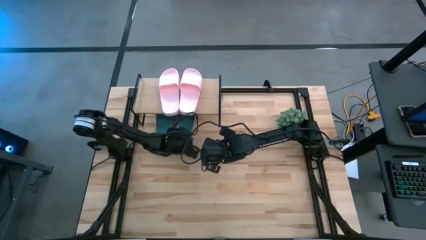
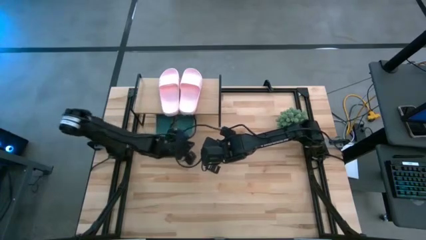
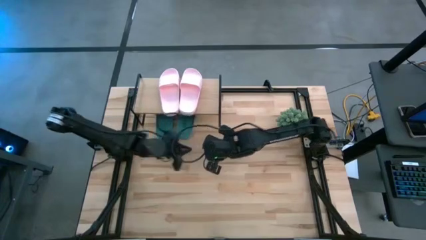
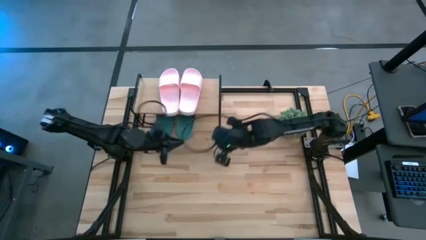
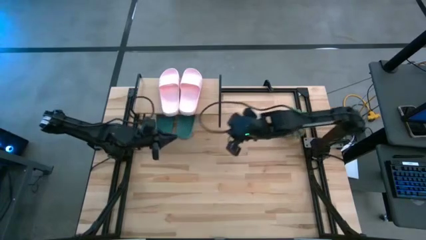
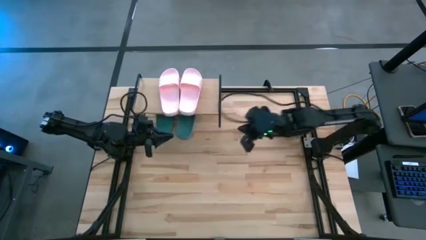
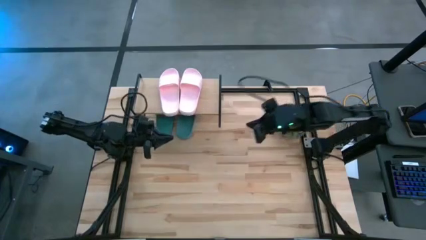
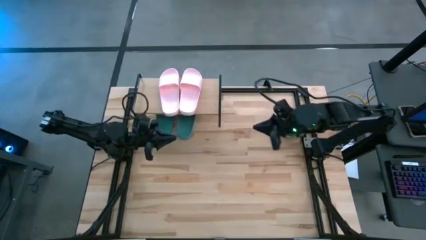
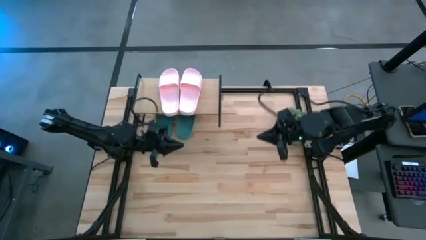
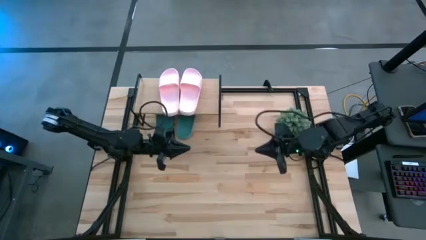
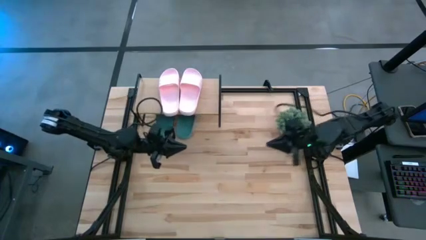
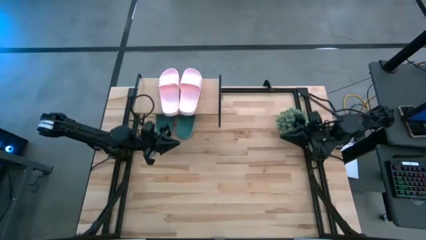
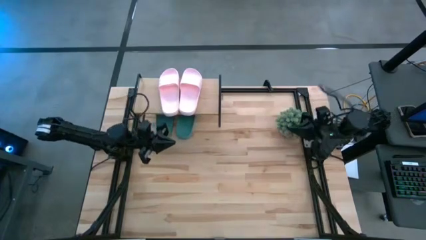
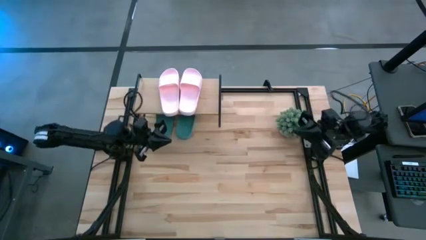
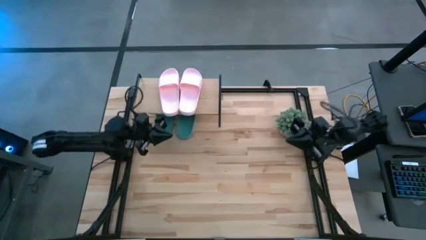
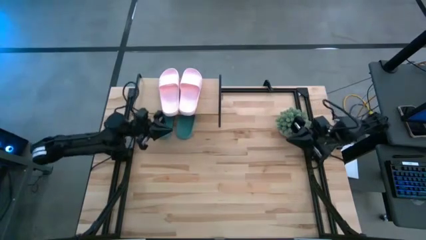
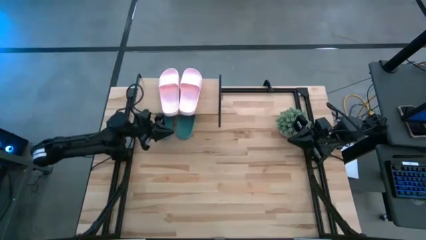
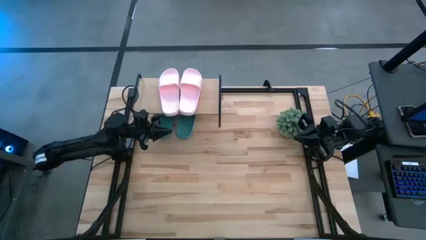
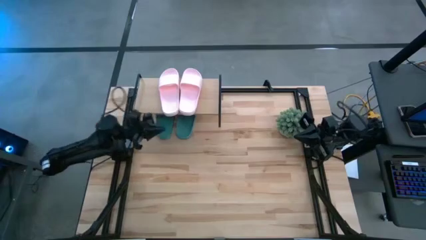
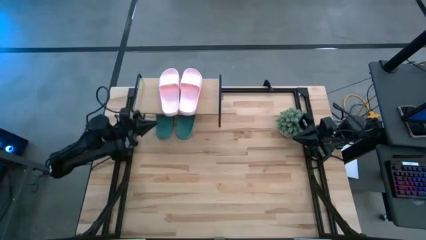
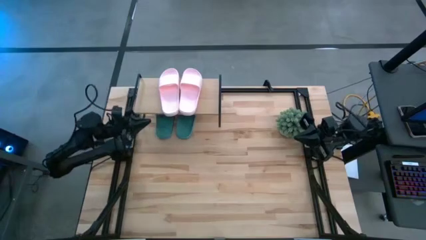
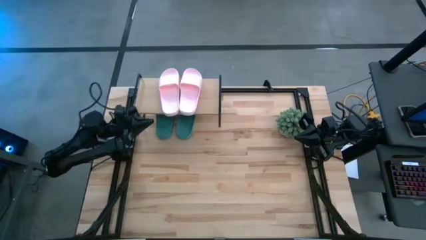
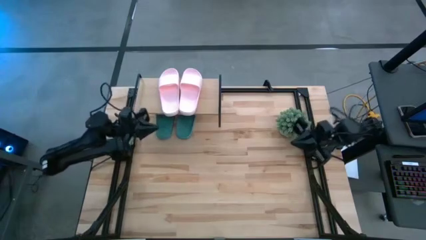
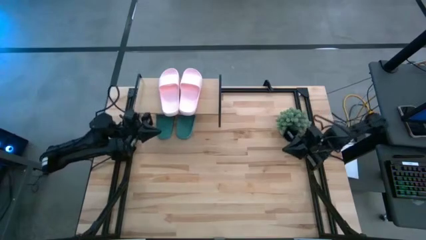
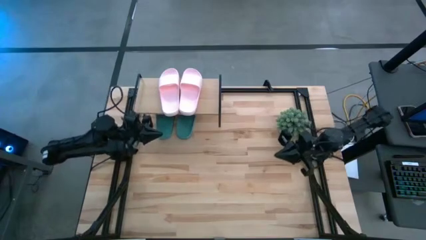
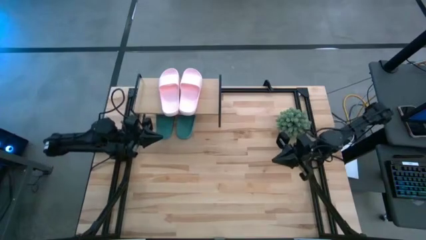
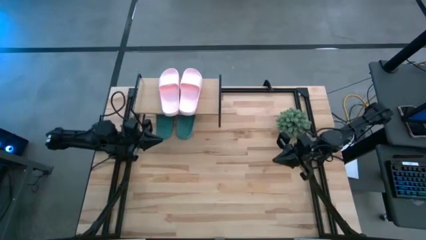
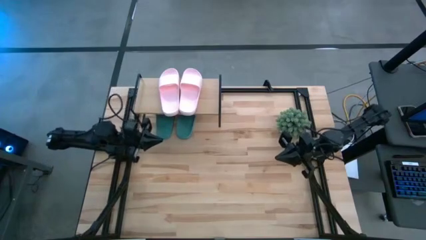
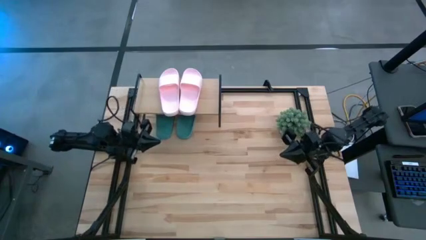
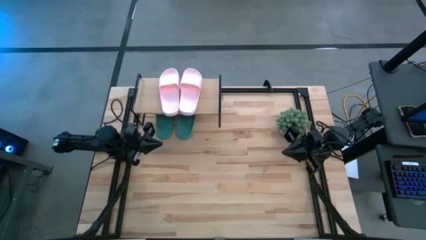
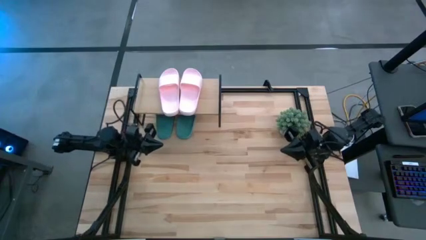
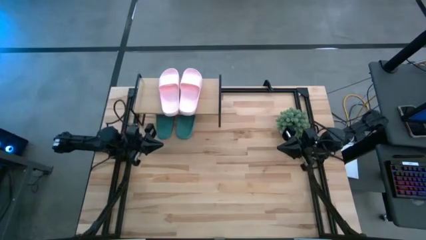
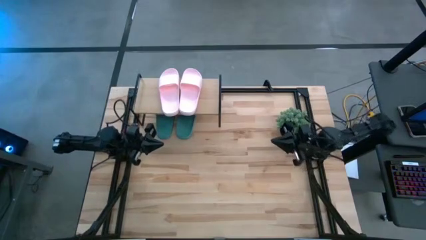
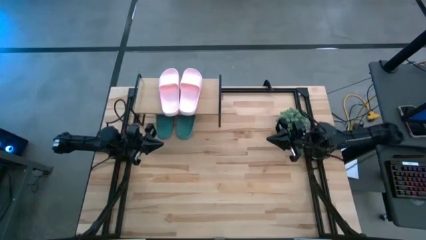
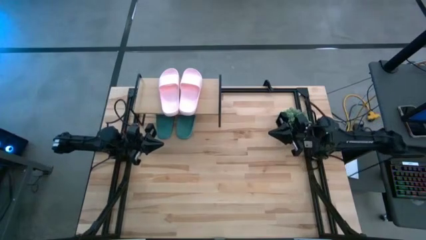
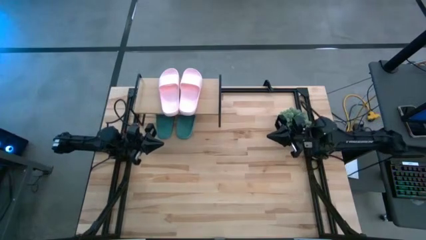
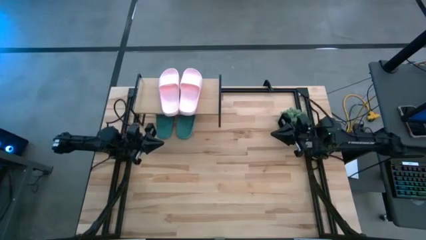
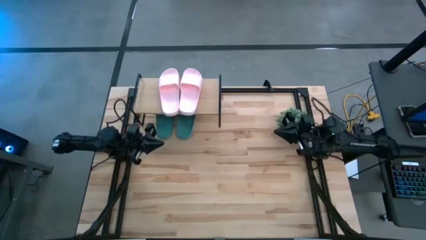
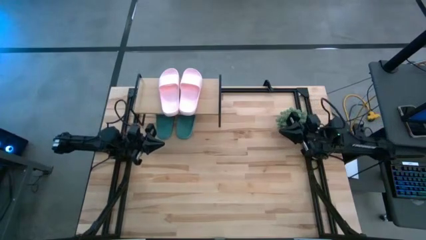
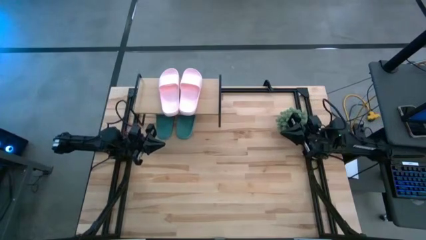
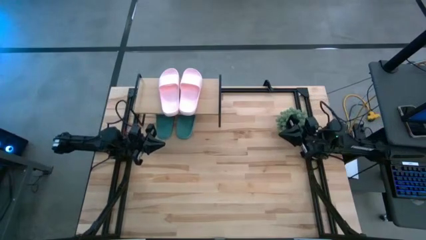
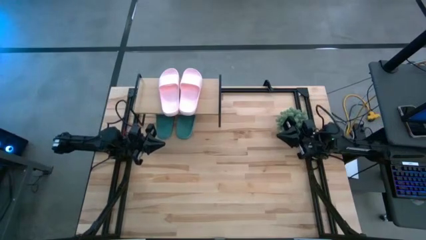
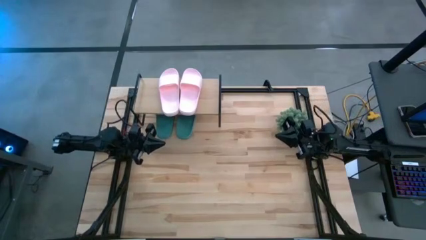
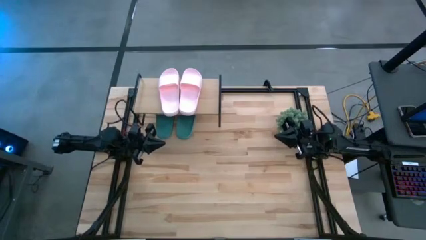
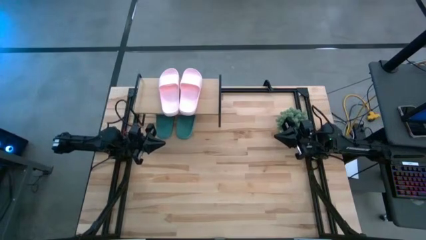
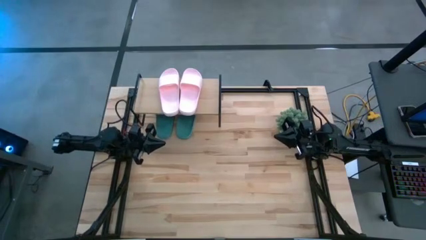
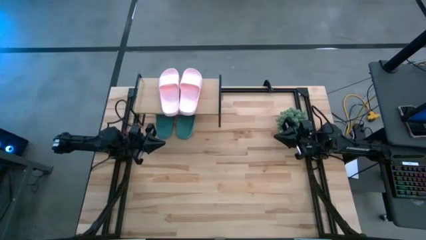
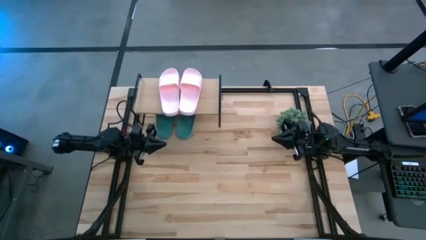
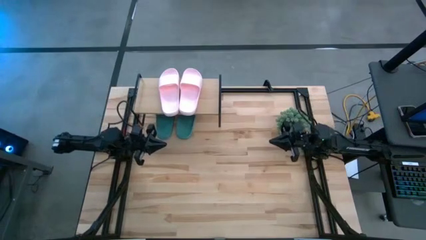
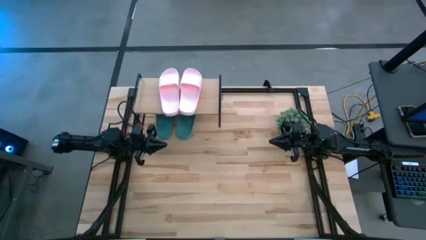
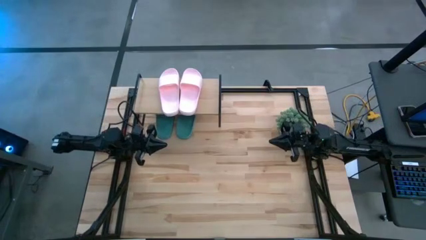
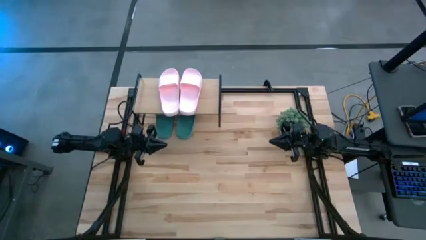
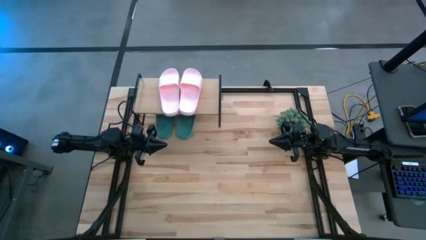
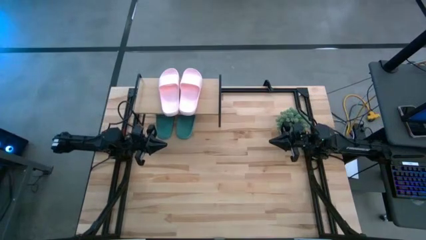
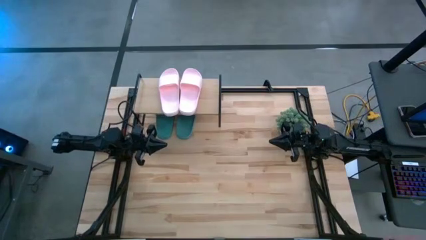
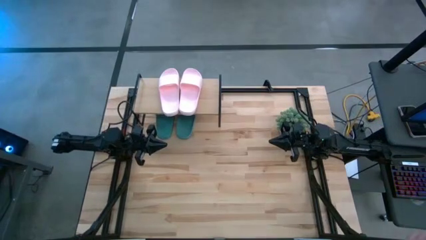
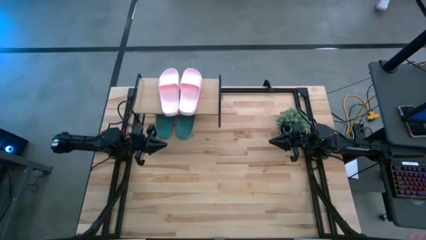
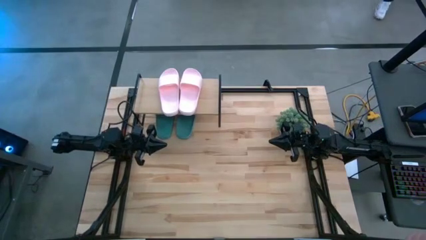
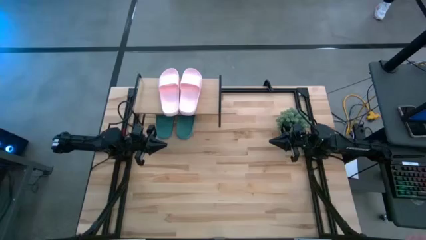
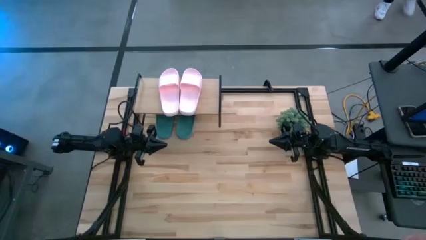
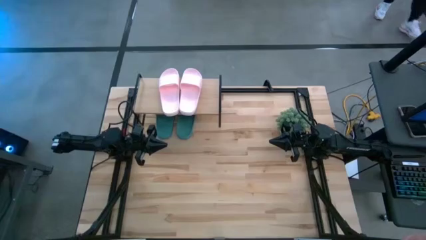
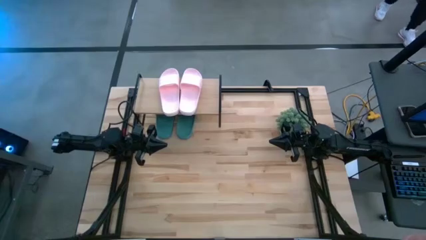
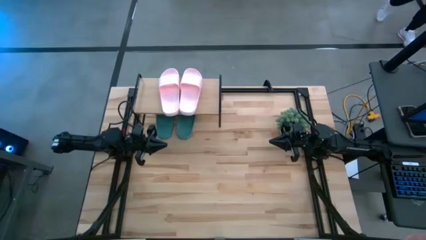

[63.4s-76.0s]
Task: Pick and place slides into the shelf
Return to Home Position
